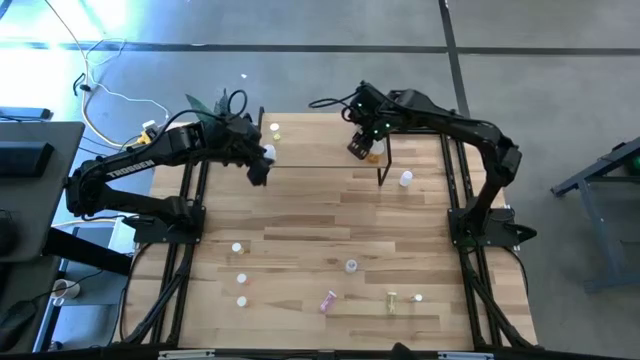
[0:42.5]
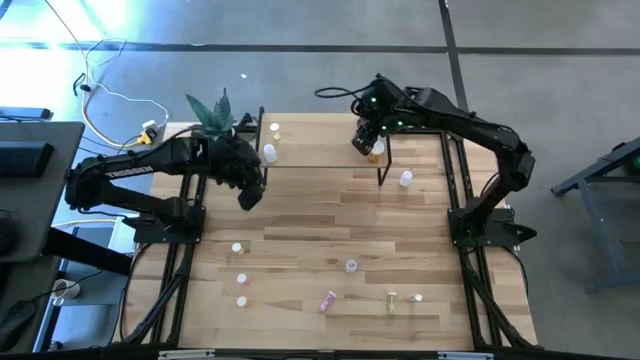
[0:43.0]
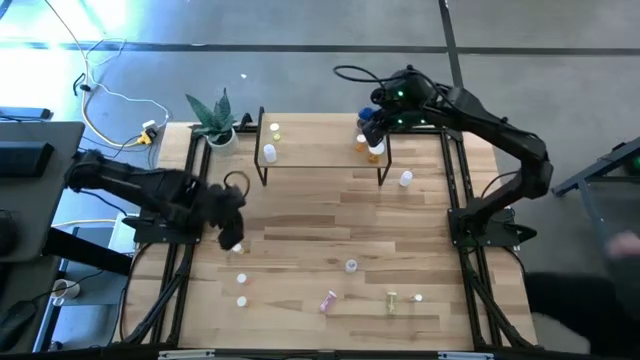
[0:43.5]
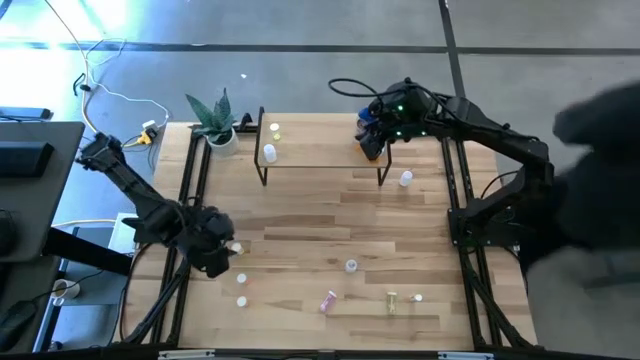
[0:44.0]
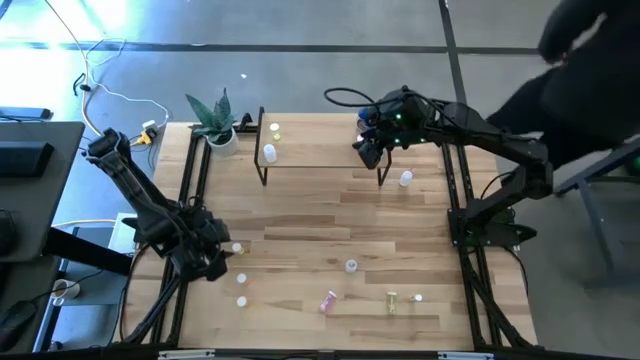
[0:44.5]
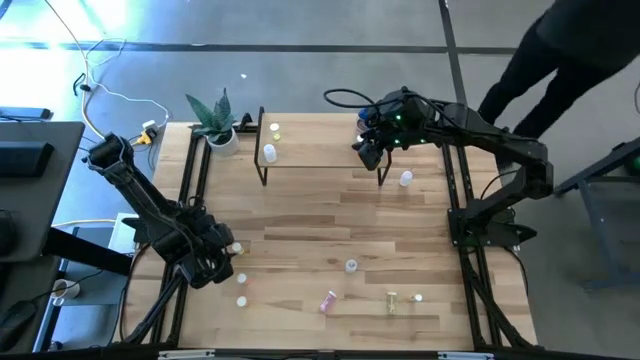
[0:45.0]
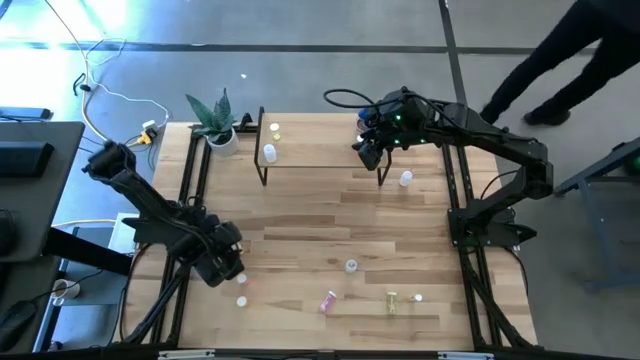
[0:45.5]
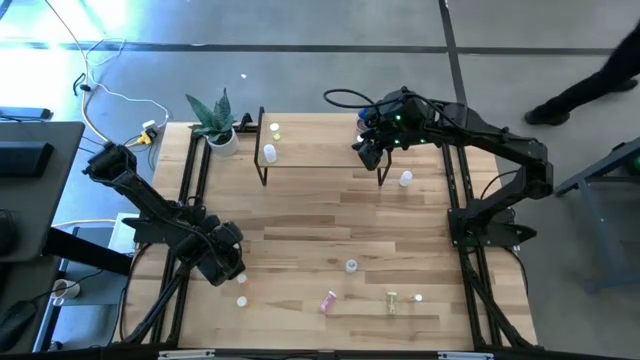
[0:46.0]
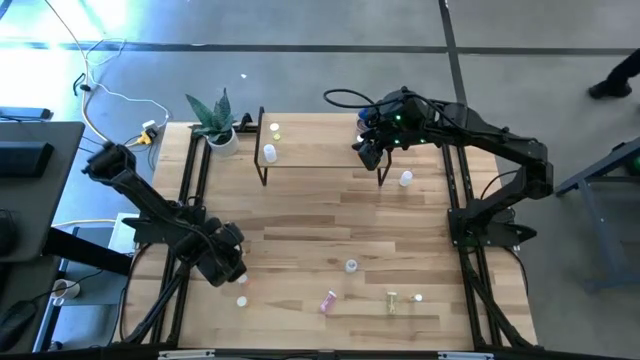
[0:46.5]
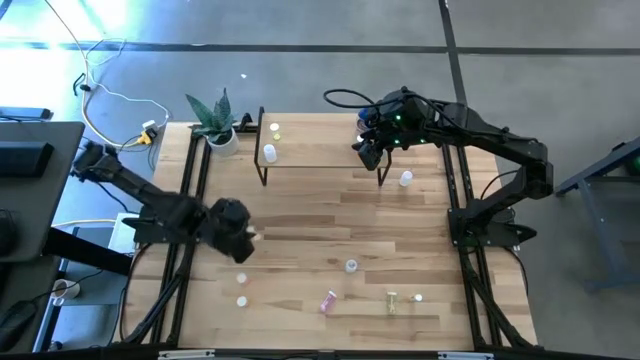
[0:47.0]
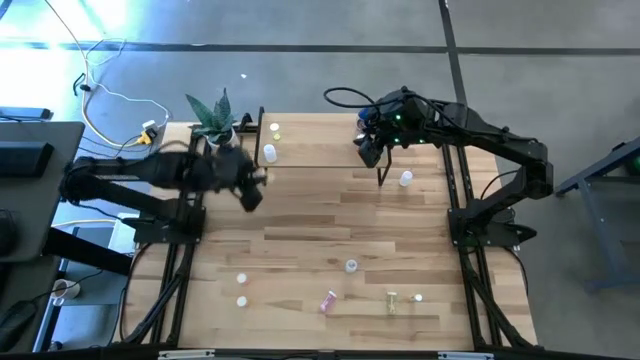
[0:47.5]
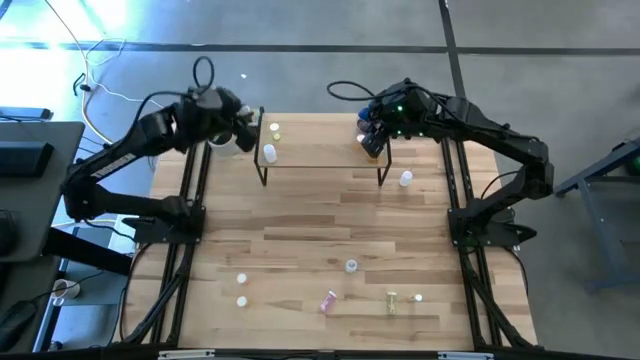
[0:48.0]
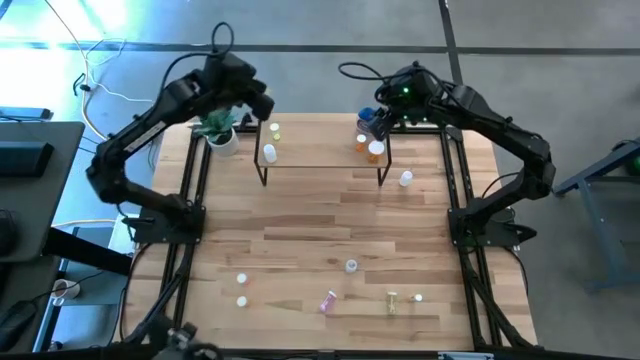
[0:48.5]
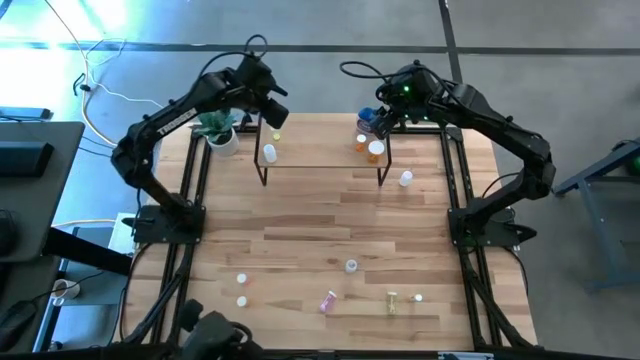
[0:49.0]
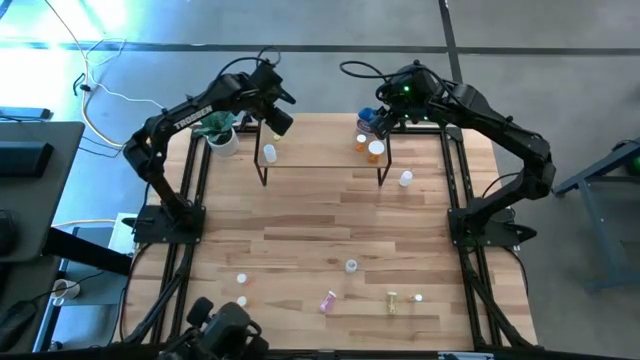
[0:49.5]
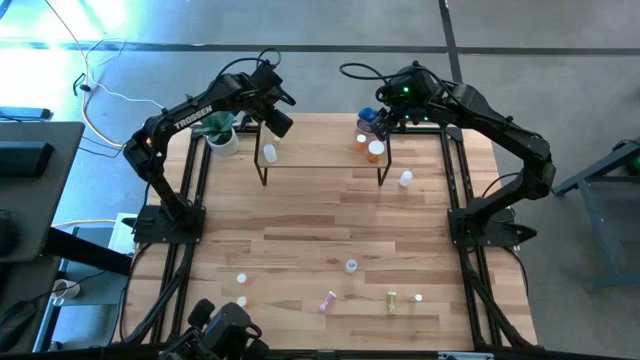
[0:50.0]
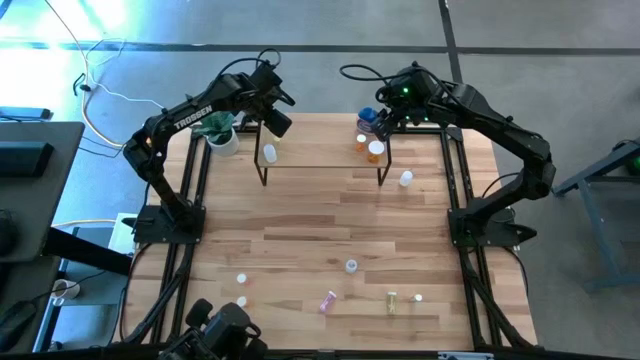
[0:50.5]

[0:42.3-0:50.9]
Task: Pick and place medicine bottles onto shelf by color
Put the small yellow pill bottle on the shelf

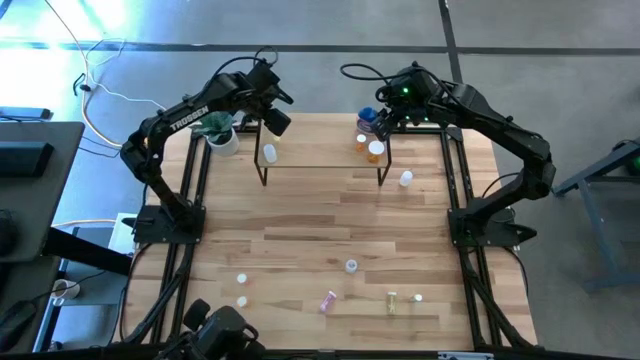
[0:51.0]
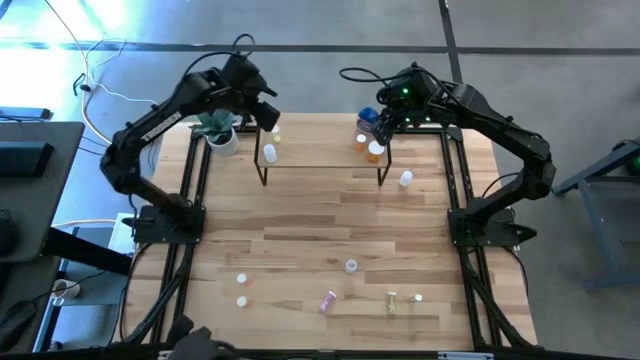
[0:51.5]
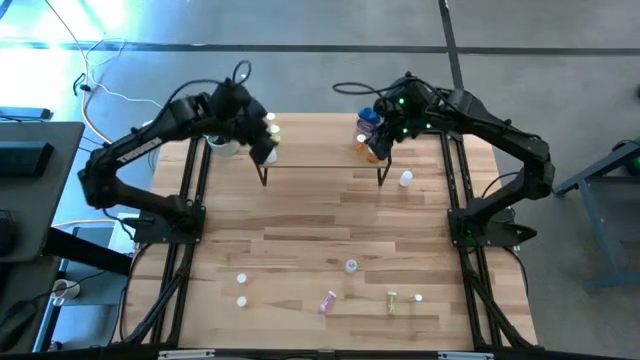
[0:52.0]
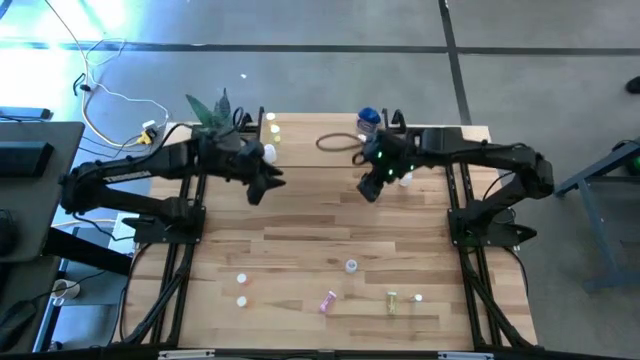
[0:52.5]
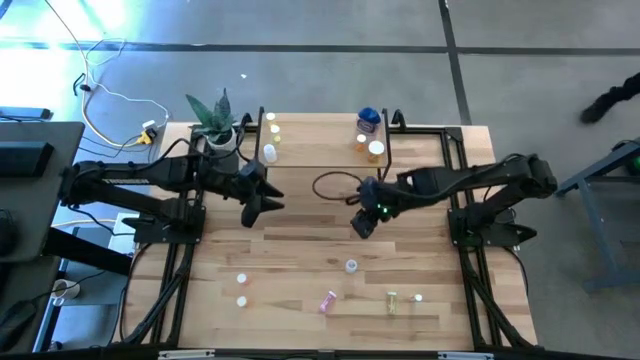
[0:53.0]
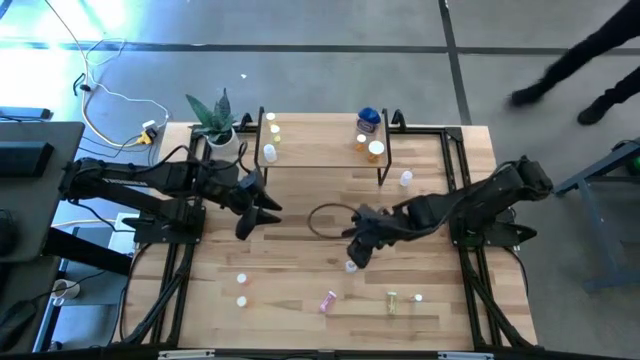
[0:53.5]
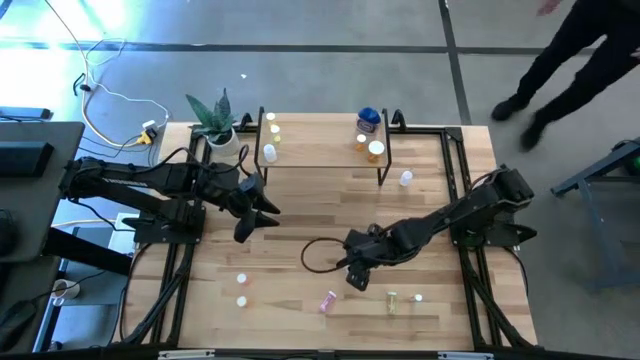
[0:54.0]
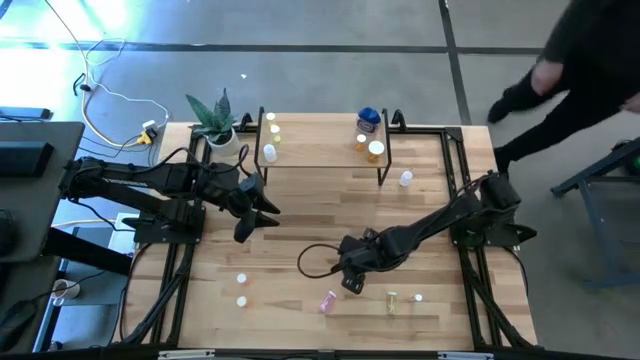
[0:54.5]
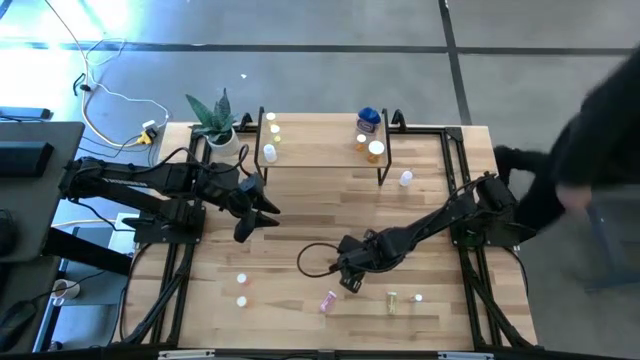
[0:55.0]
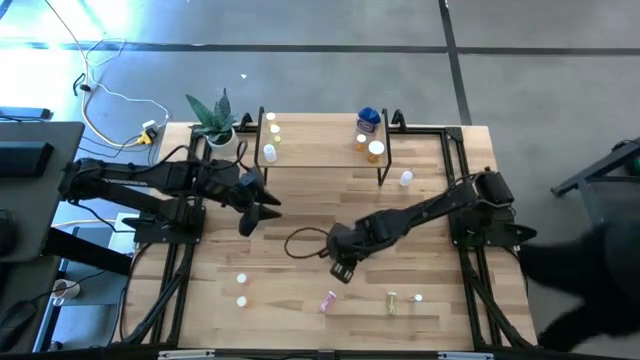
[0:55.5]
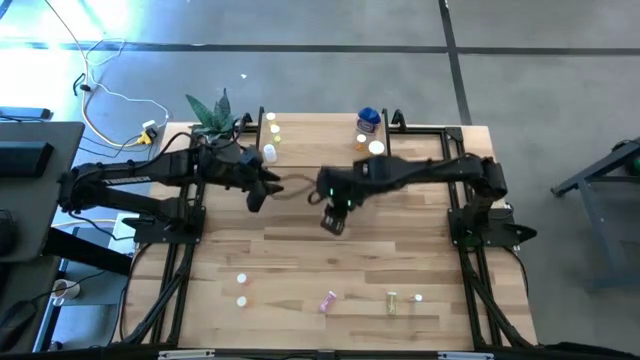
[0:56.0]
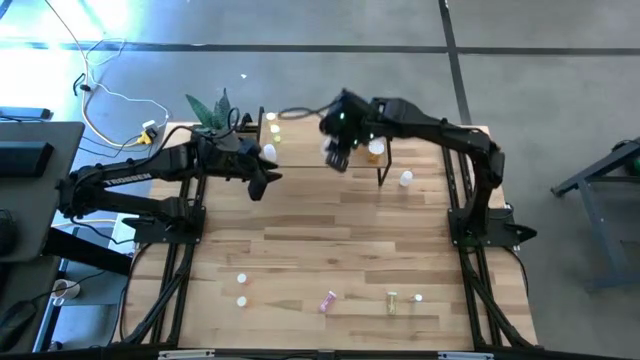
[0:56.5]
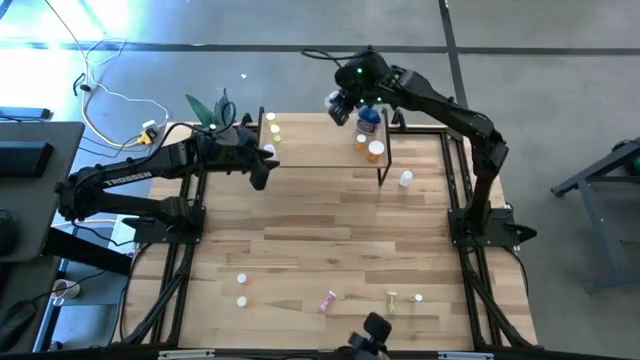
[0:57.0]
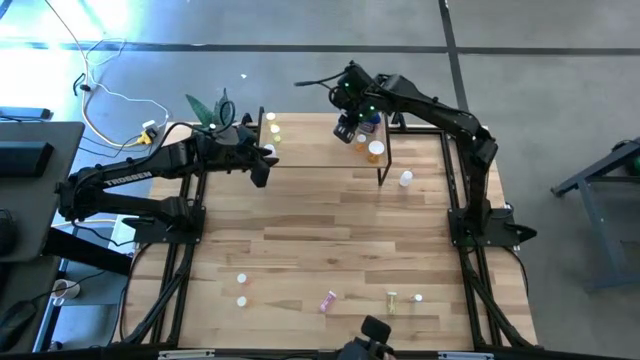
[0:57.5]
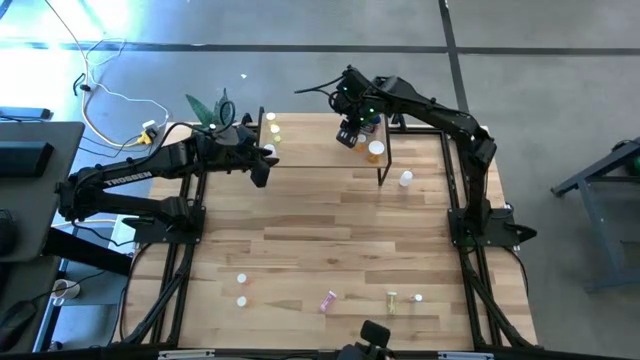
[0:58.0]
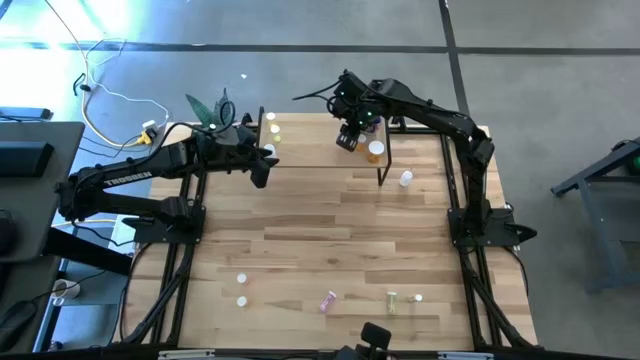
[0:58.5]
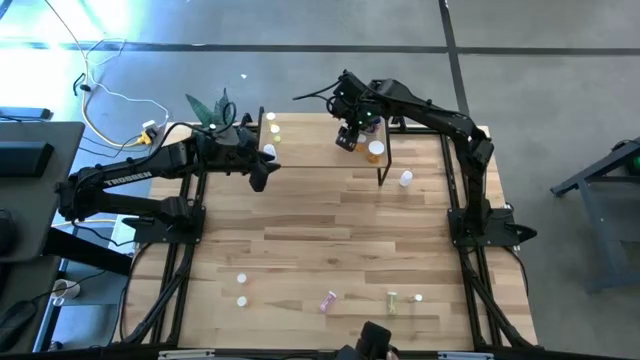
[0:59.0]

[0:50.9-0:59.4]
Put the small transparent pill bottle on the shelf

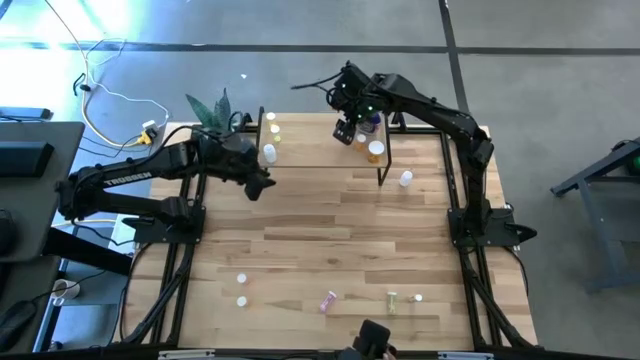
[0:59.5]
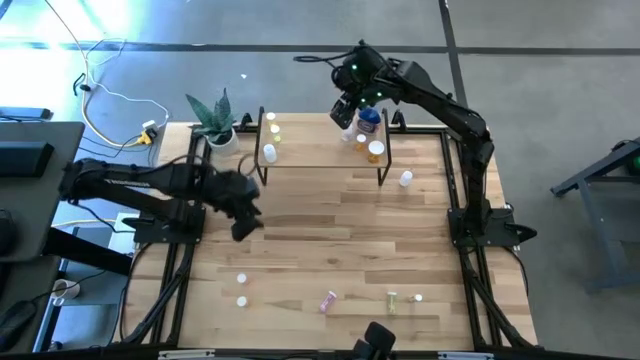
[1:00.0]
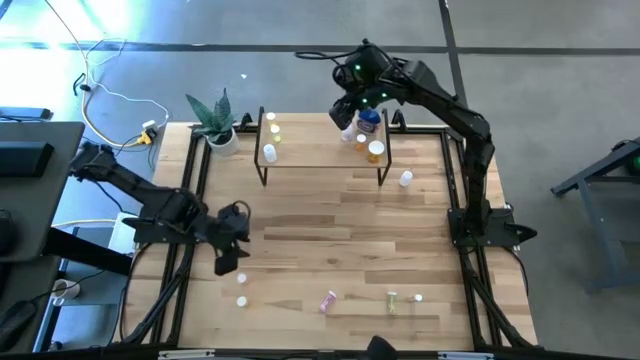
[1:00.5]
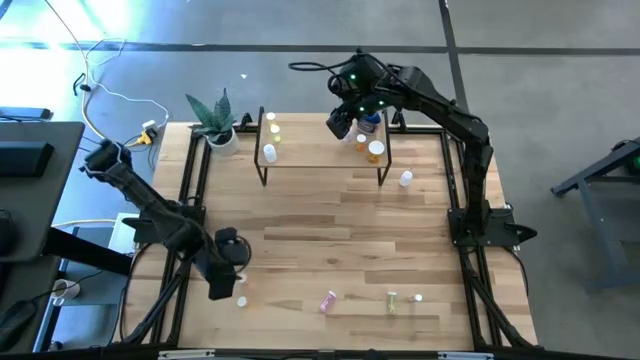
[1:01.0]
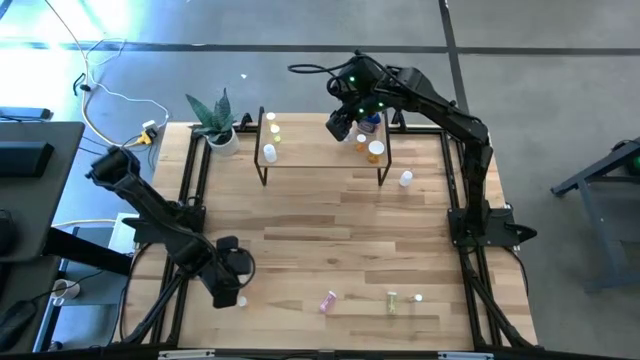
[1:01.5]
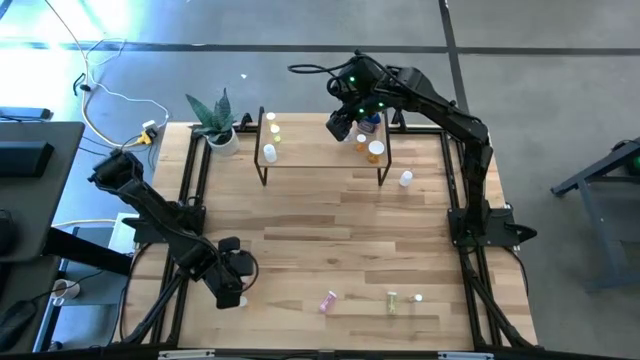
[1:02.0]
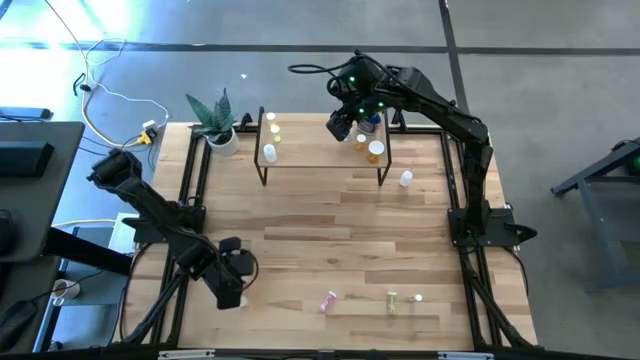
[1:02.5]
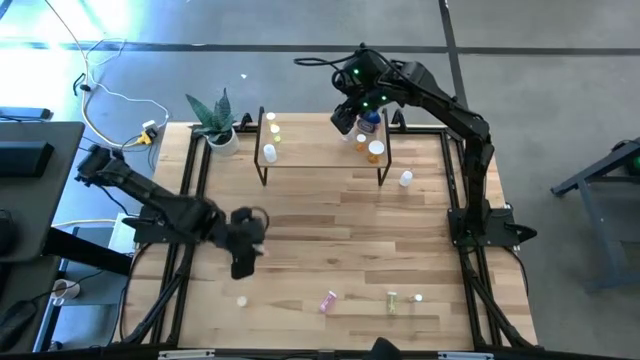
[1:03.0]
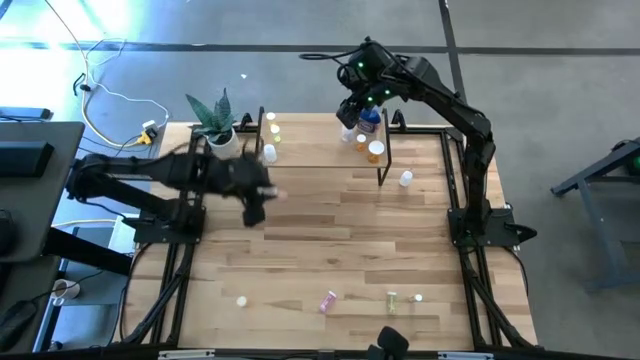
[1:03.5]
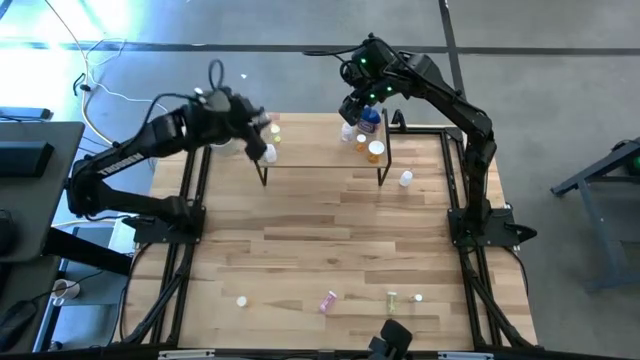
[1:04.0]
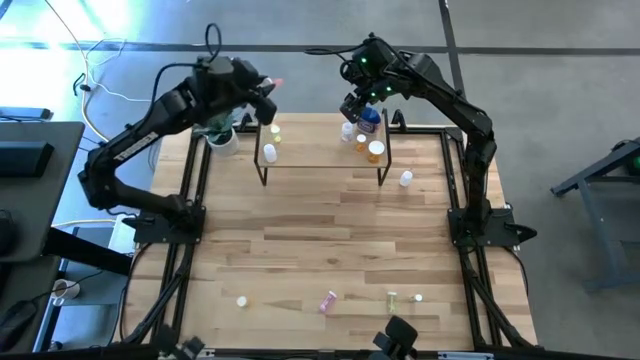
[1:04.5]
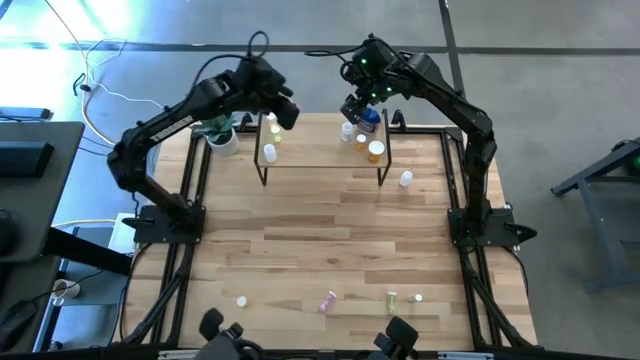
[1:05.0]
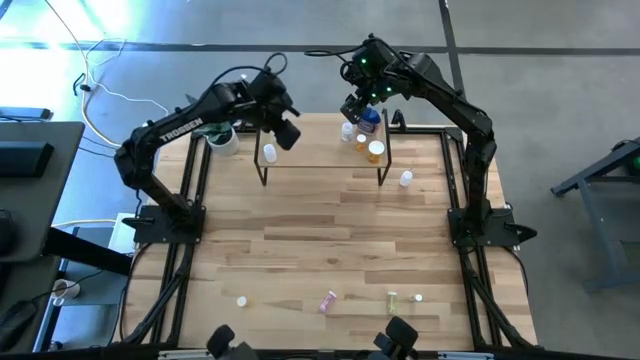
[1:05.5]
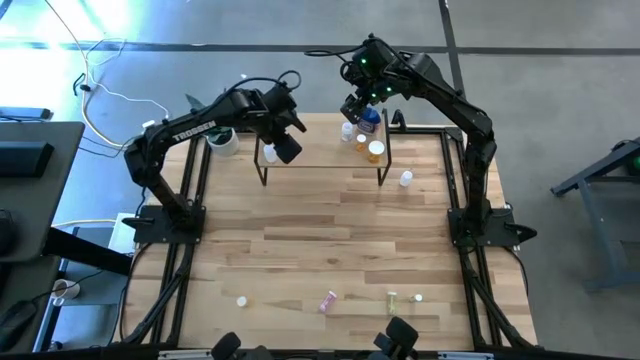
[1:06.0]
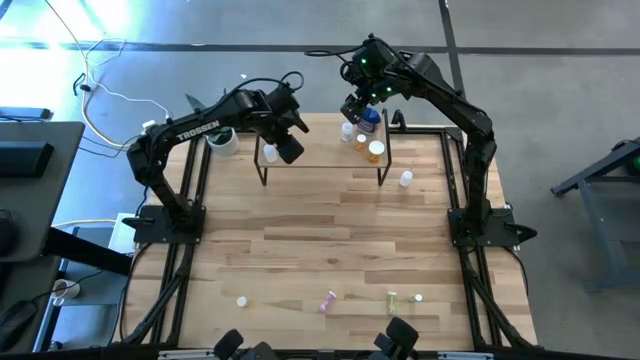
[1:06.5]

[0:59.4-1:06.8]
Put the small pink pill bottle on the shelf
